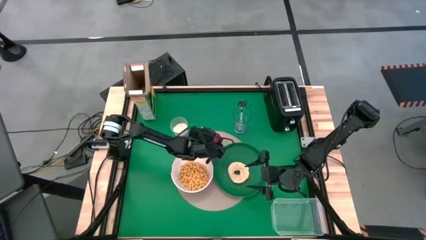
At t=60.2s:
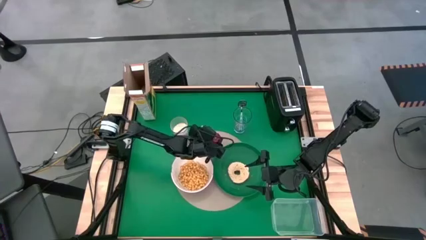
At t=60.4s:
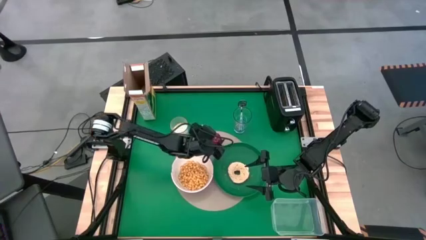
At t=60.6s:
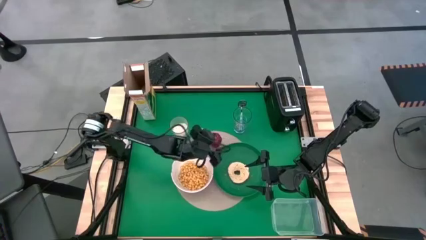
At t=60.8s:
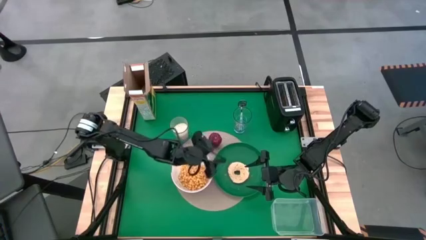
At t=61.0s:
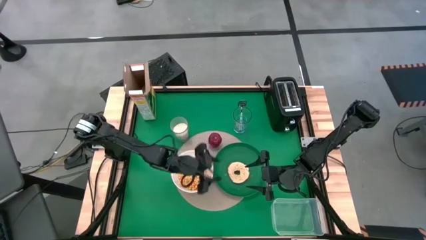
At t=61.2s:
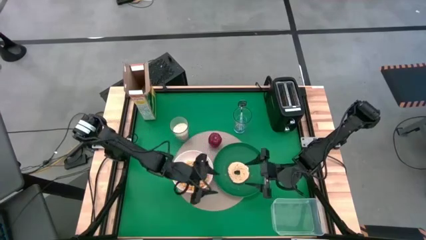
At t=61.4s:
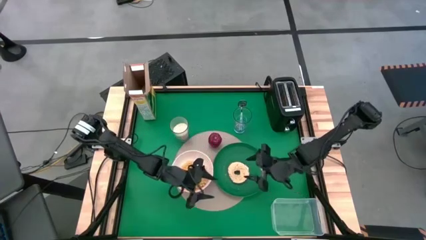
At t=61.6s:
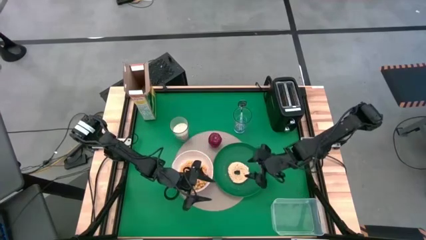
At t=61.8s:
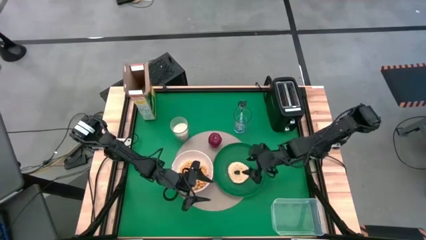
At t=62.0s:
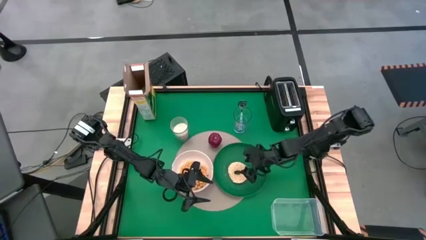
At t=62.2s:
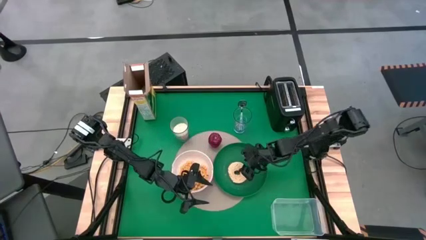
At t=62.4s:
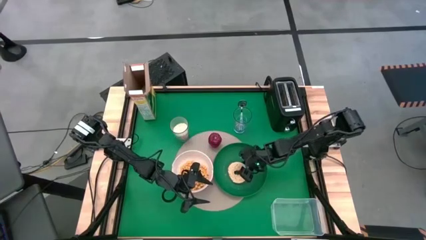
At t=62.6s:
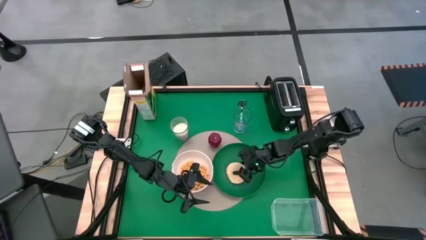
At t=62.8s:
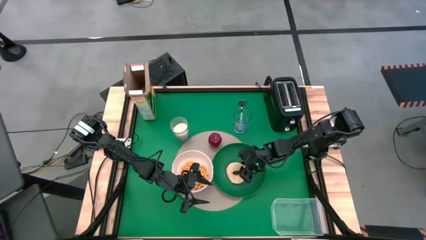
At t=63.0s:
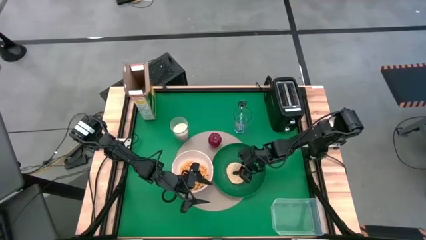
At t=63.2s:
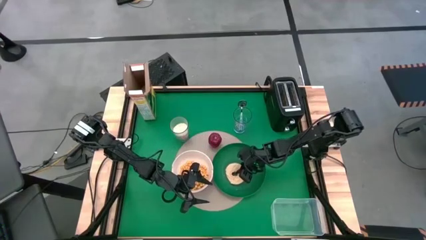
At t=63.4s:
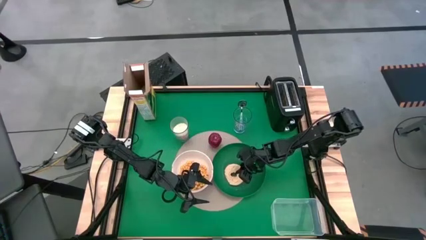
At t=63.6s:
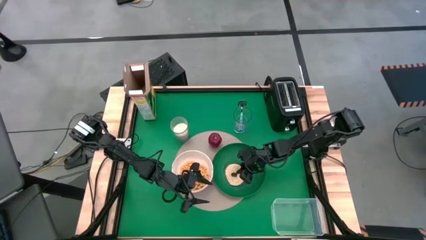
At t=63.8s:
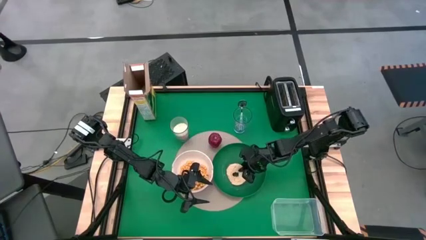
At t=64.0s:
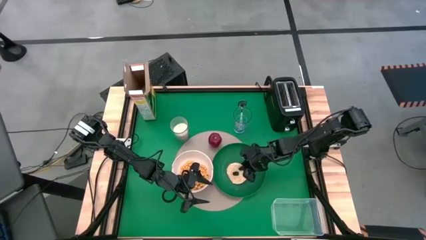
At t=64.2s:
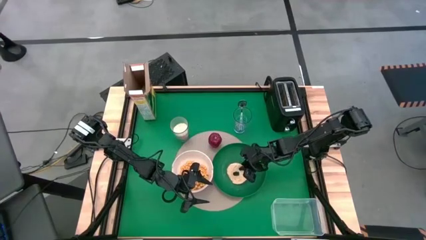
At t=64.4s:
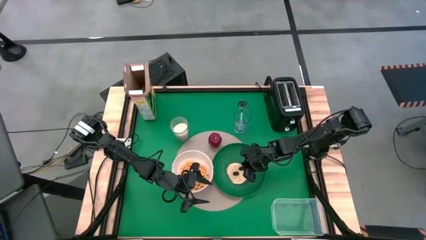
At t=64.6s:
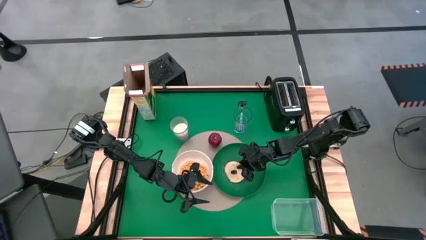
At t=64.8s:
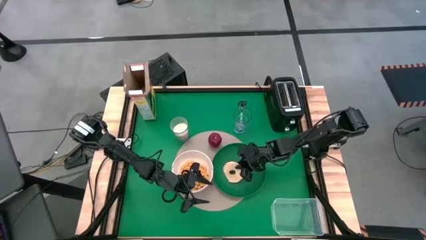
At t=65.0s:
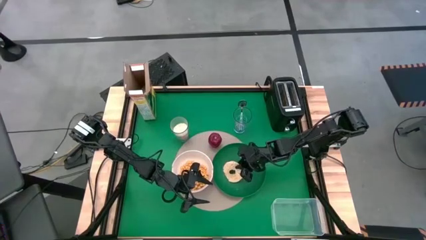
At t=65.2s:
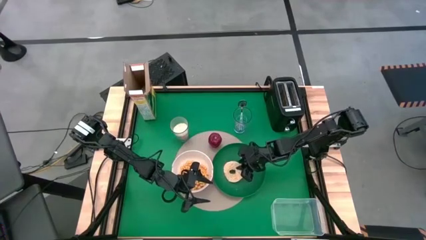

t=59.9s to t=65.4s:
Task: Arrange a breakfast setting
Adjust the bagel on the green plate

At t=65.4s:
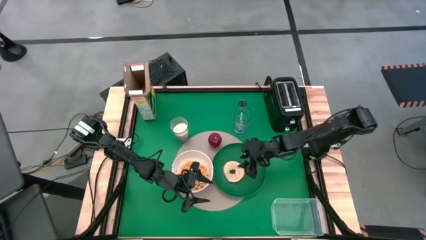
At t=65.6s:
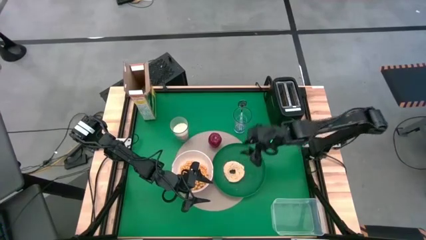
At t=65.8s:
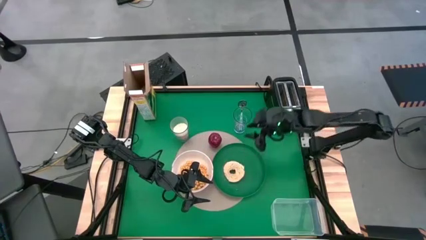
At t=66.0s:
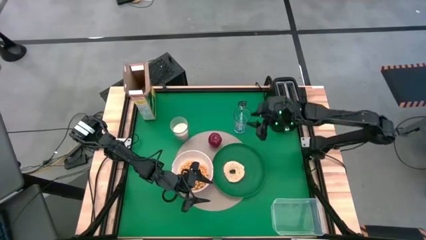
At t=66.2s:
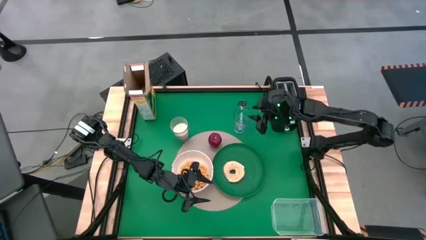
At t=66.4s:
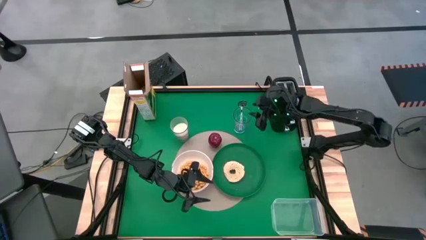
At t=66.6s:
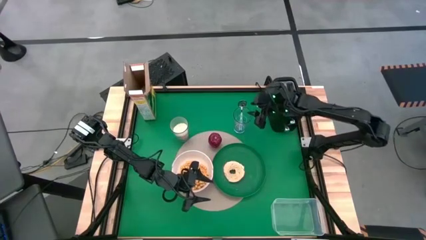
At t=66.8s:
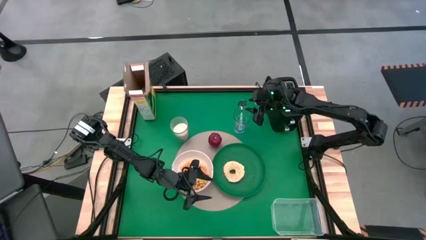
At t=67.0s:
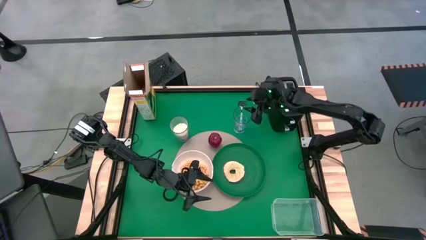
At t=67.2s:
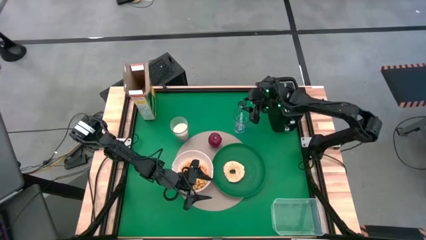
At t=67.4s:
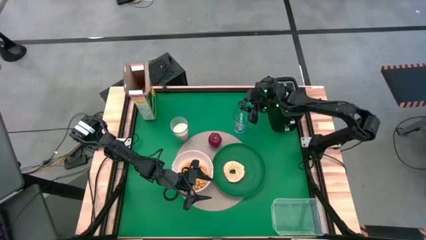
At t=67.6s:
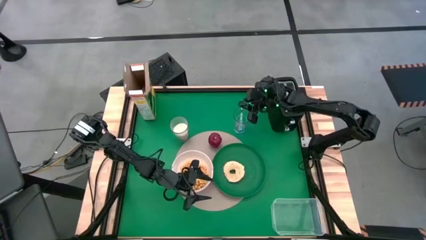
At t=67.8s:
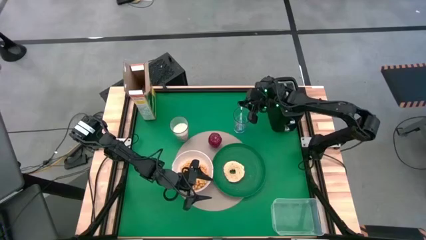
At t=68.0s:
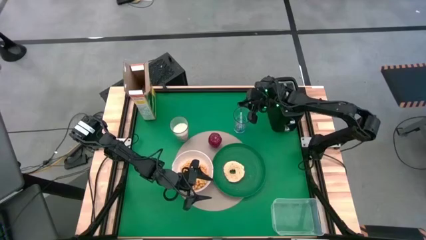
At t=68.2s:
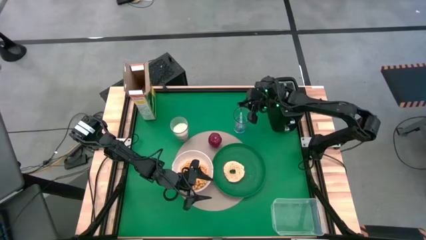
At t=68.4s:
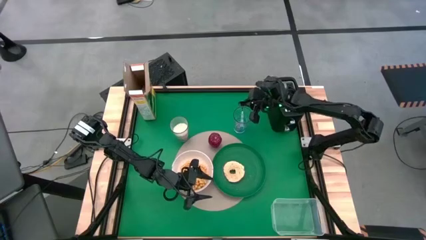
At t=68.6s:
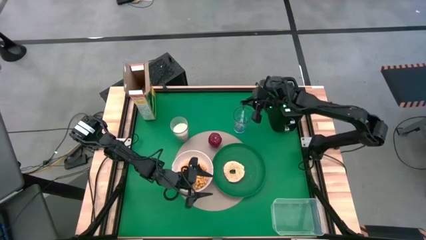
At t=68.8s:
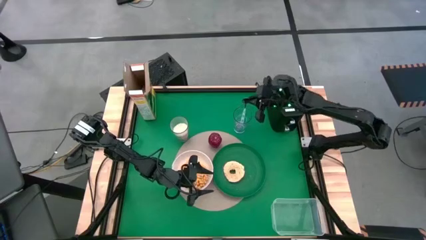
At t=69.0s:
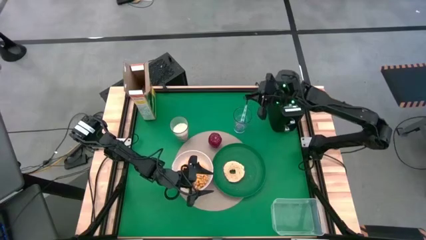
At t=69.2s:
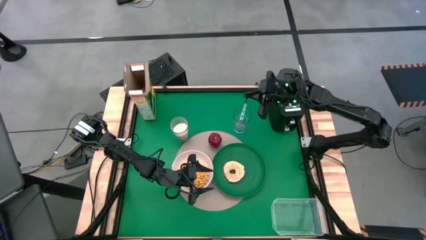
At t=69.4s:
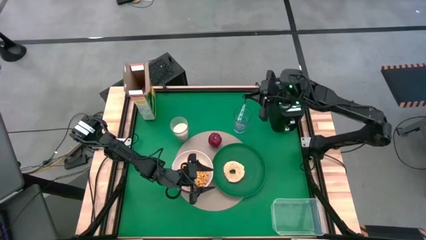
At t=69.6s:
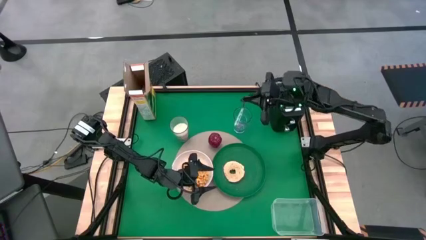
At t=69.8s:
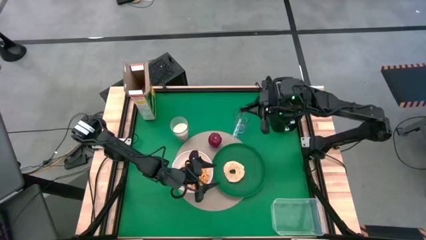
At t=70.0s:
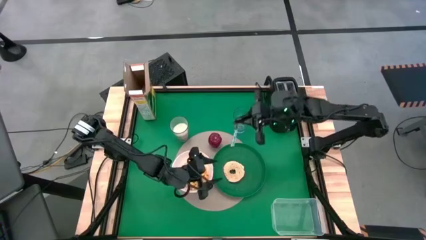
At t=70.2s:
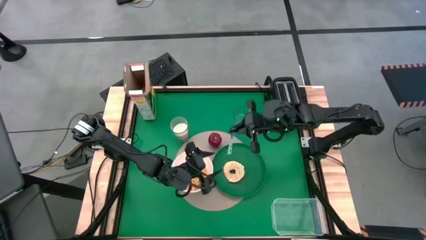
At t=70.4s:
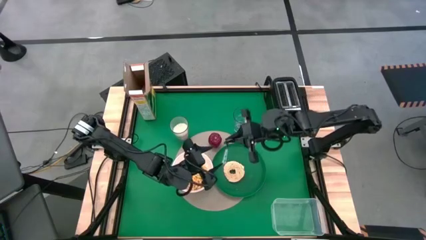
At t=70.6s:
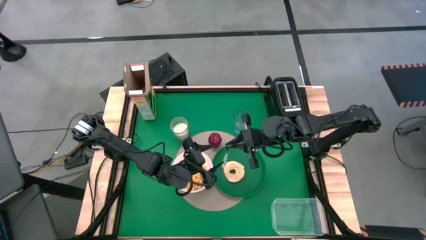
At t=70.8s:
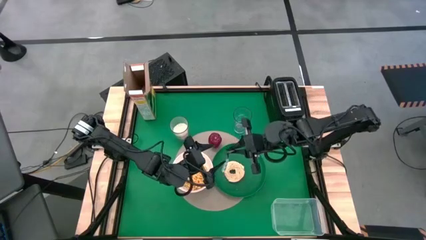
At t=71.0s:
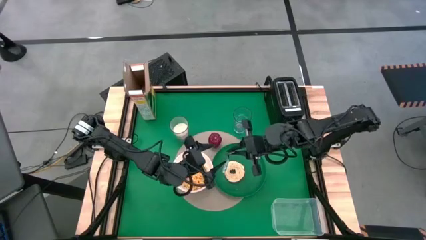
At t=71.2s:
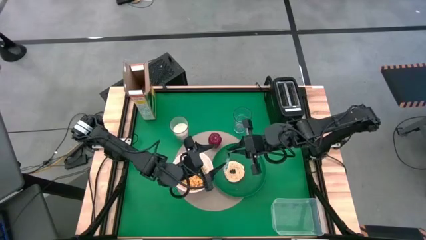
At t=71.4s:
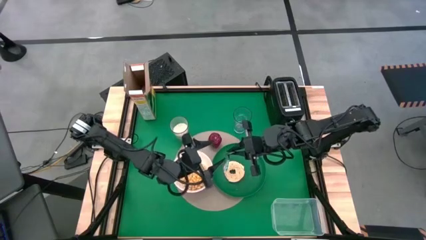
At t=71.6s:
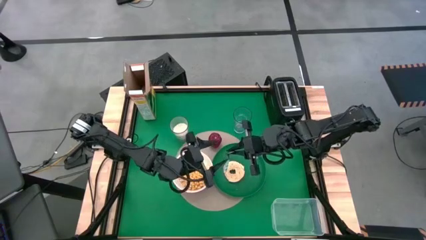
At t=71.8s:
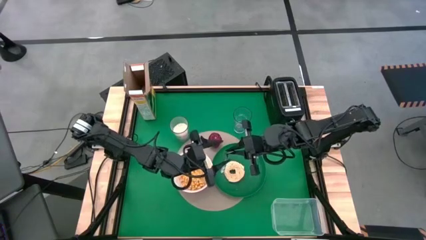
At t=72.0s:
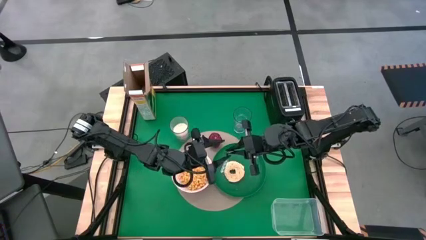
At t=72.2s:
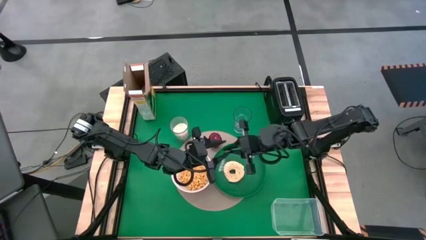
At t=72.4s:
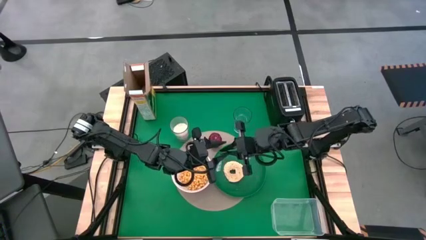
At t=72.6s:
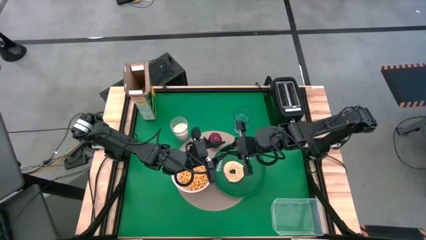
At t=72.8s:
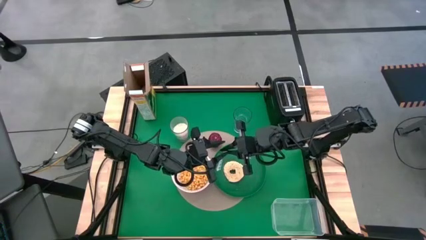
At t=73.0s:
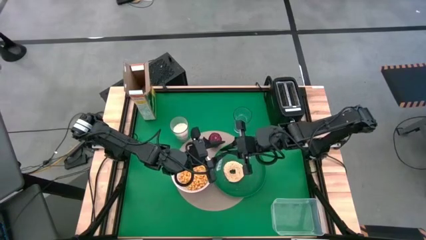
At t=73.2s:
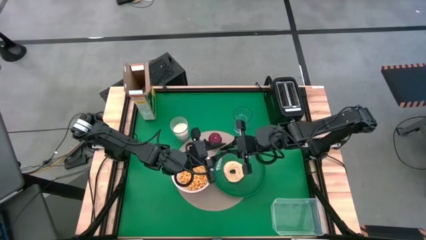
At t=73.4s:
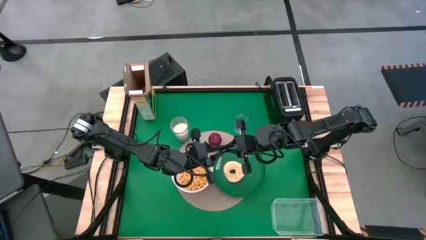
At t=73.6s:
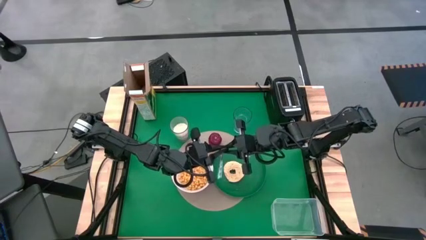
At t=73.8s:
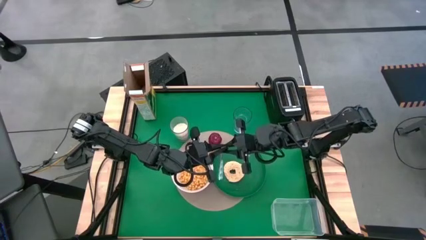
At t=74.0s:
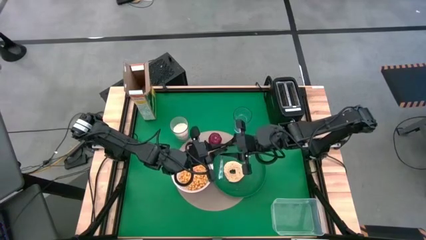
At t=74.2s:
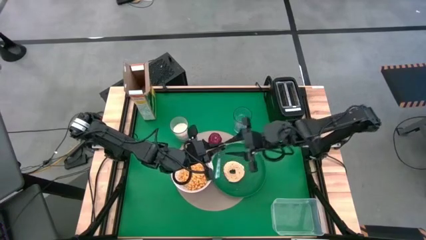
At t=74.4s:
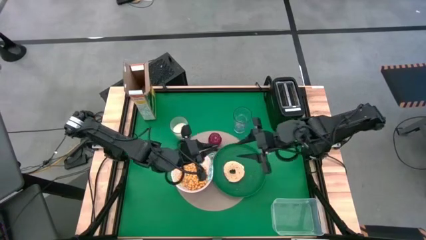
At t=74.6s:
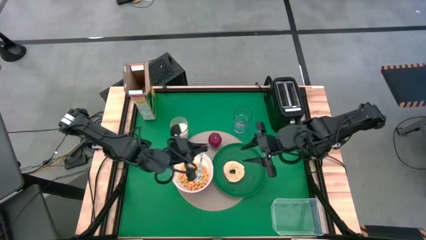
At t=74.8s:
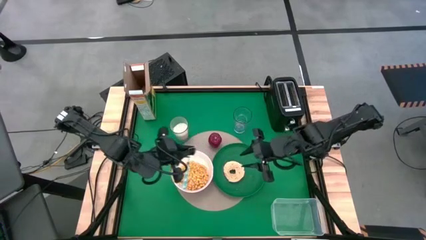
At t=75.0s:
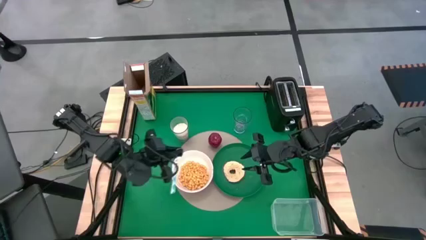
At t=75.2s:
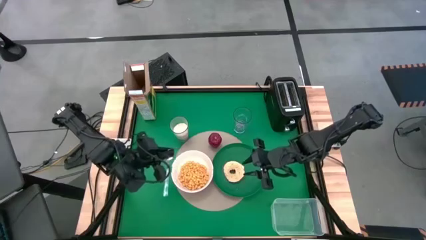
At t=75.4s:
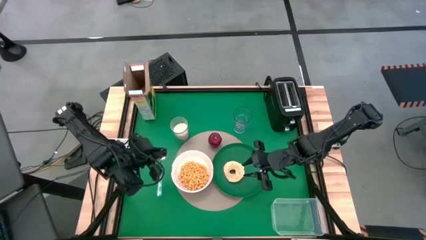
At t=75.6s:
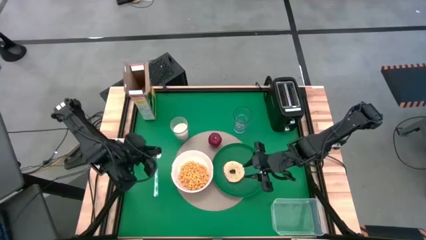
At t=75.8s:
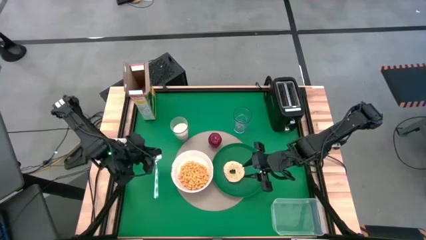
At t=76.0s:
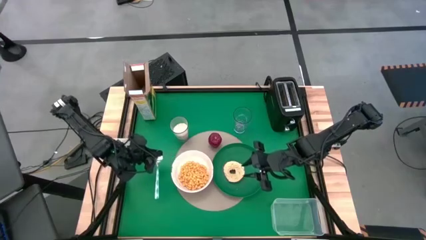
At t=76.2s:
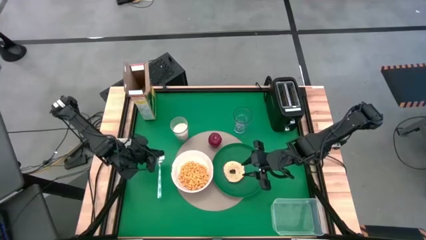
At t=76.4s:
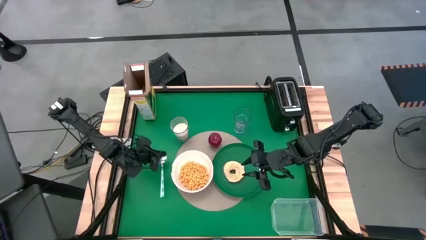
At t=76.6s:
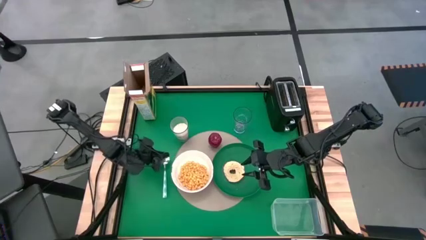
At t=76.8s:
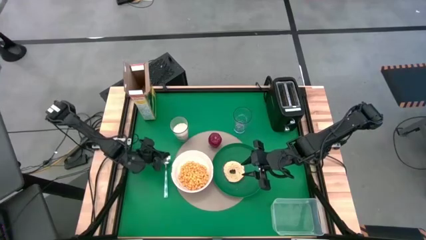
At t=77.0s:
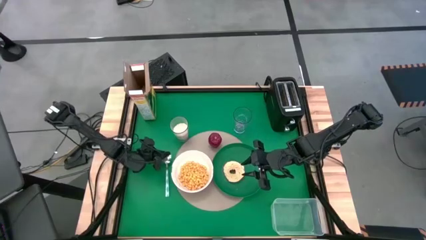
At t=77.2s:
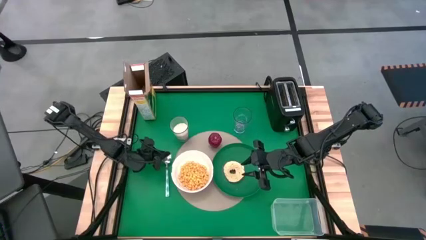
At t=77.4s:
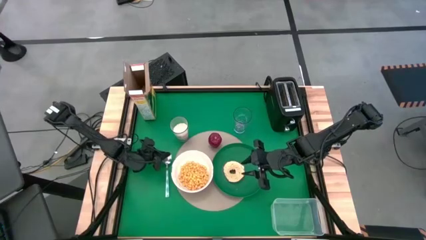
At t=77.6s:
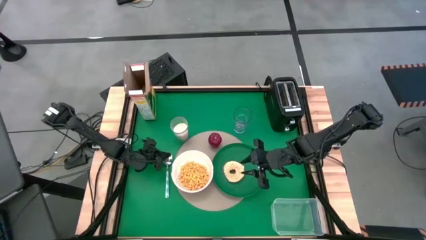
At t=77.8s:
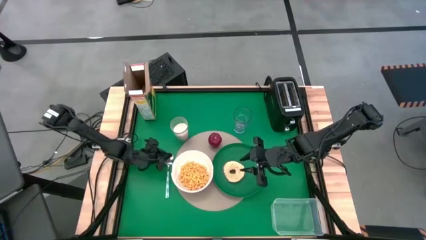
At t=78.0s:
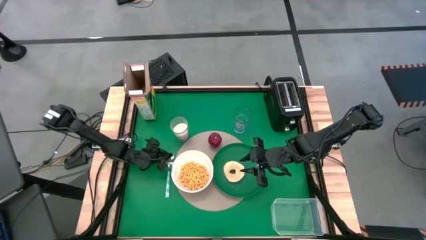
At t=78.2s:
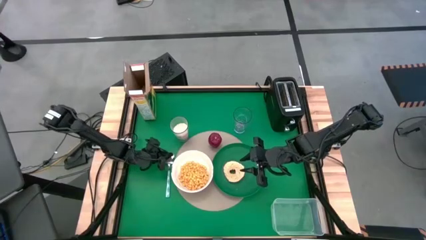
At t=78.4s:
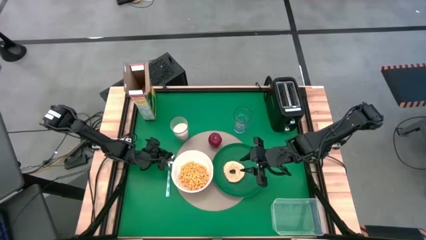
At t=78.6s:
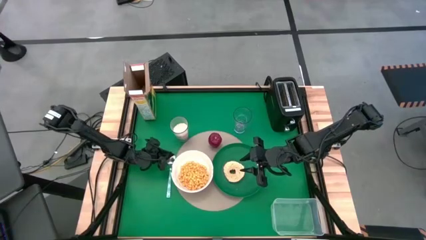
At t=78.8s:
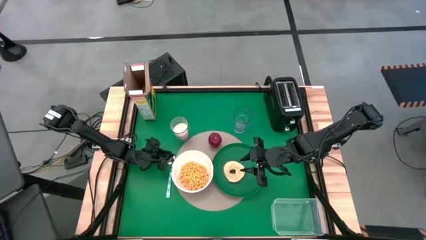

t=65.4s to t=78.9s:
Put the white spoon on the left side of the tablemat
